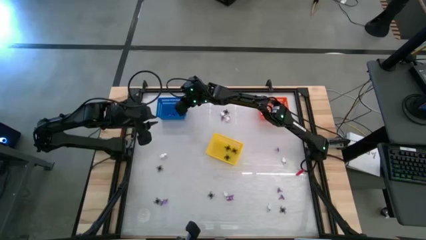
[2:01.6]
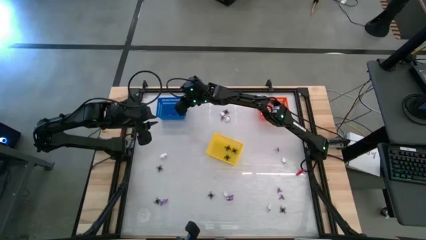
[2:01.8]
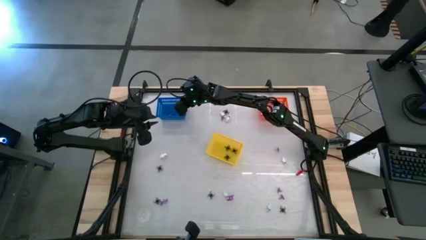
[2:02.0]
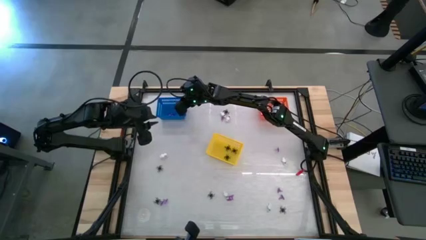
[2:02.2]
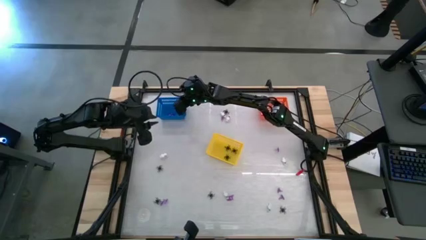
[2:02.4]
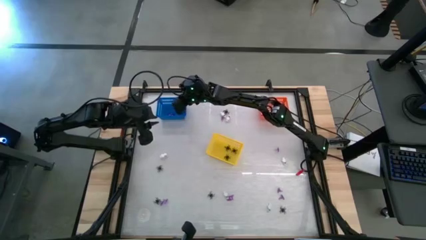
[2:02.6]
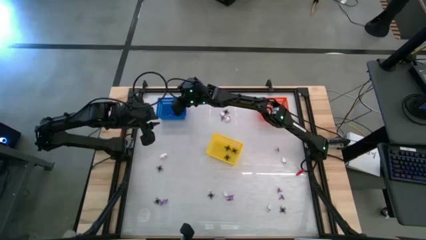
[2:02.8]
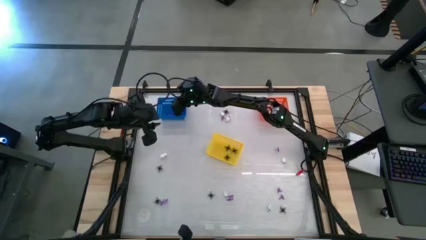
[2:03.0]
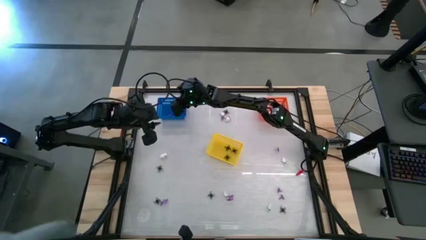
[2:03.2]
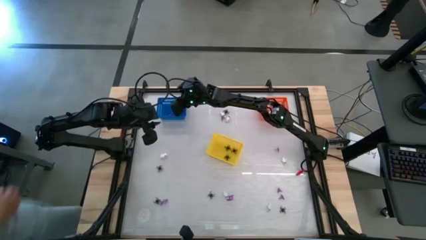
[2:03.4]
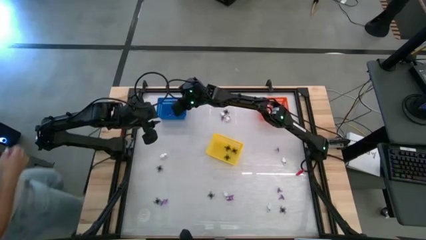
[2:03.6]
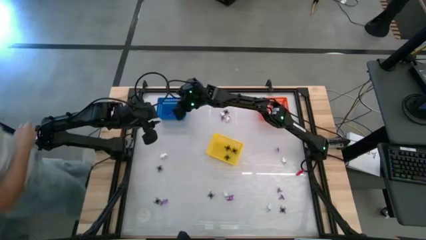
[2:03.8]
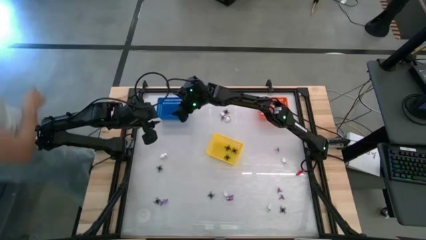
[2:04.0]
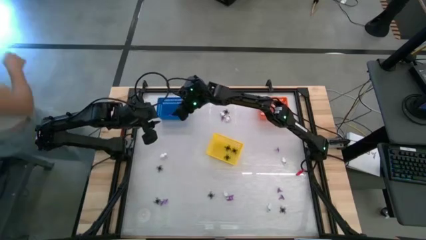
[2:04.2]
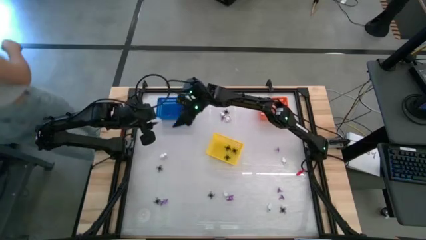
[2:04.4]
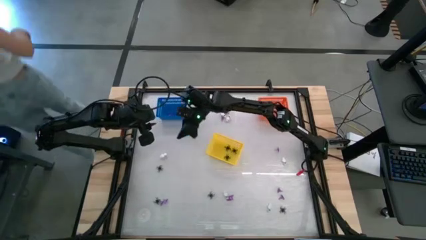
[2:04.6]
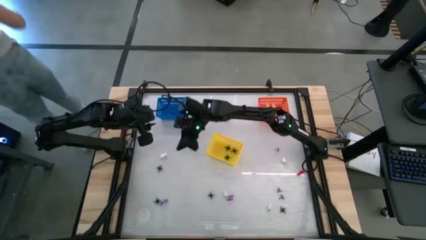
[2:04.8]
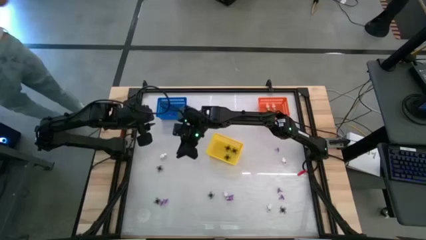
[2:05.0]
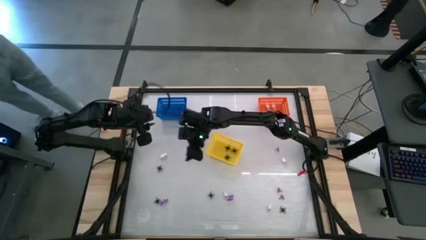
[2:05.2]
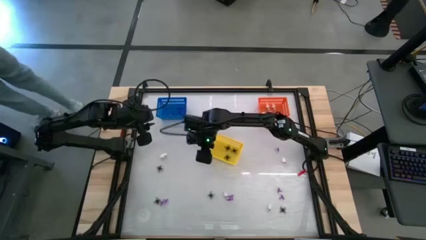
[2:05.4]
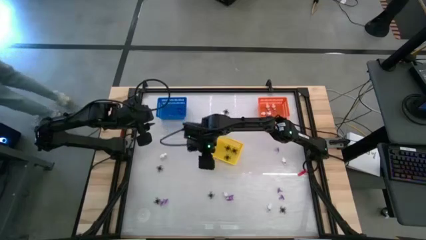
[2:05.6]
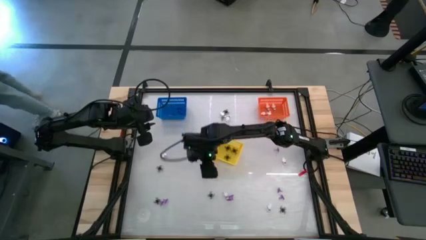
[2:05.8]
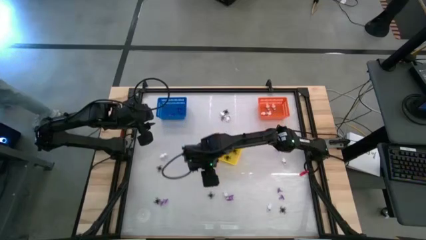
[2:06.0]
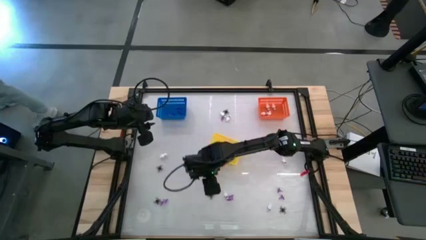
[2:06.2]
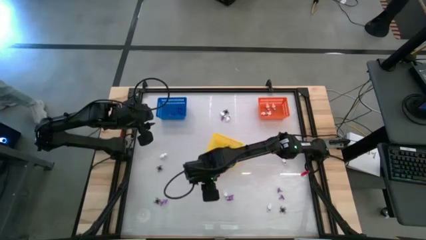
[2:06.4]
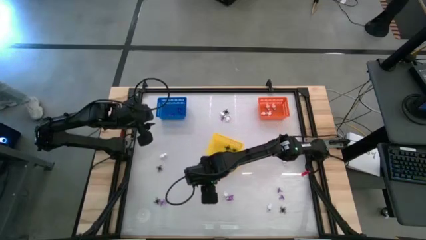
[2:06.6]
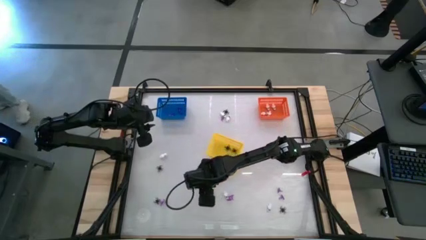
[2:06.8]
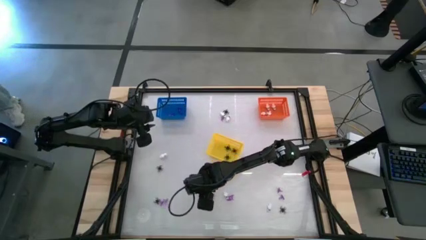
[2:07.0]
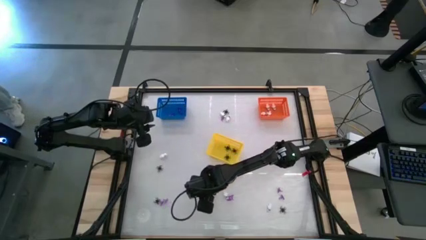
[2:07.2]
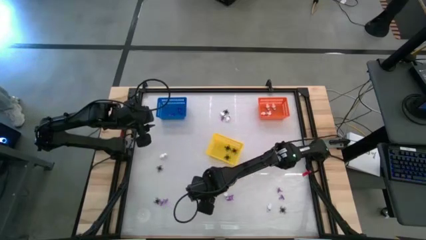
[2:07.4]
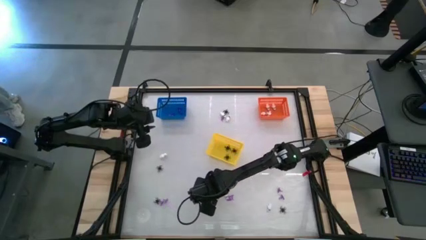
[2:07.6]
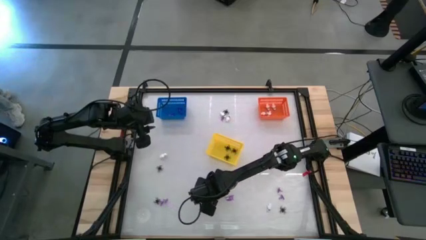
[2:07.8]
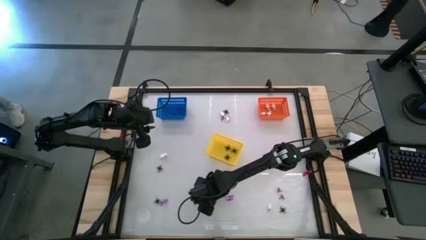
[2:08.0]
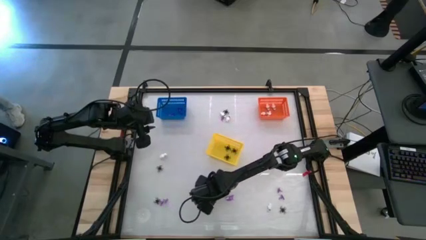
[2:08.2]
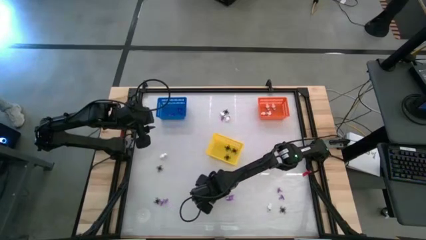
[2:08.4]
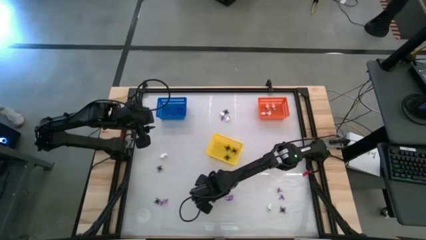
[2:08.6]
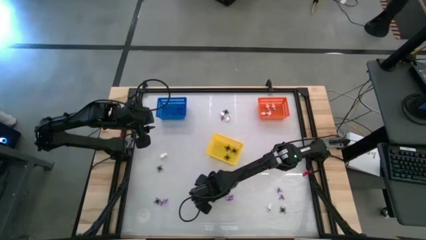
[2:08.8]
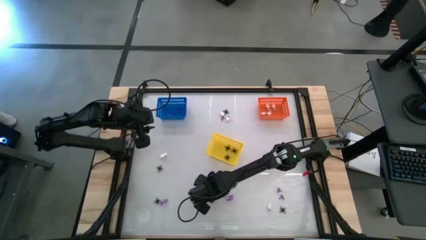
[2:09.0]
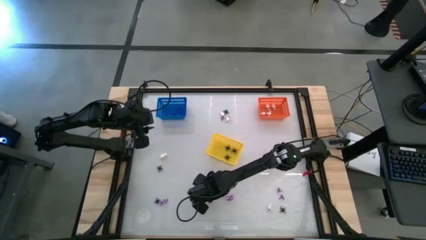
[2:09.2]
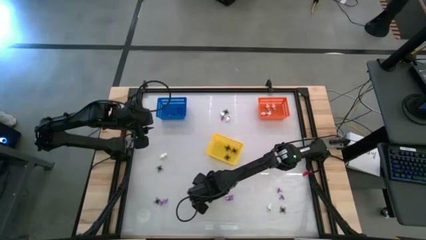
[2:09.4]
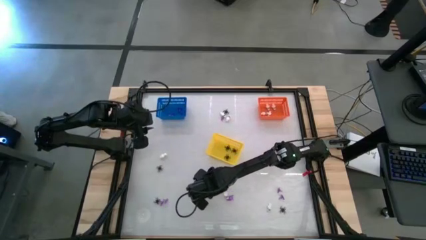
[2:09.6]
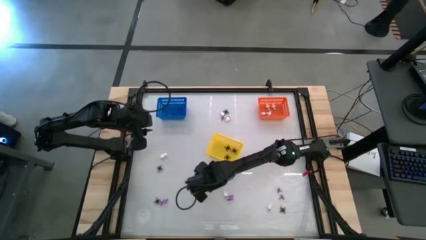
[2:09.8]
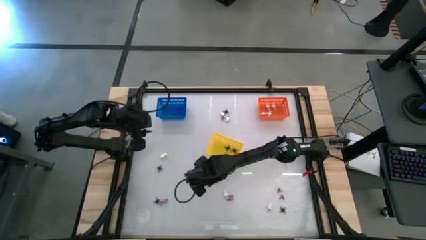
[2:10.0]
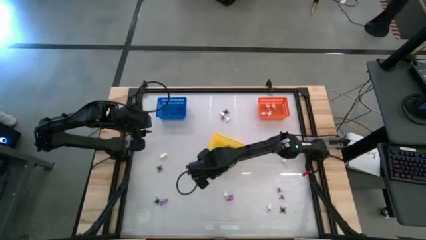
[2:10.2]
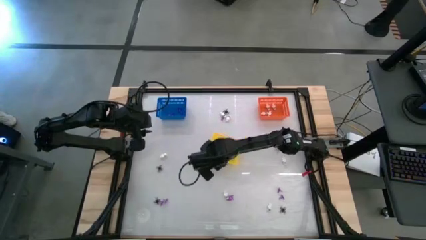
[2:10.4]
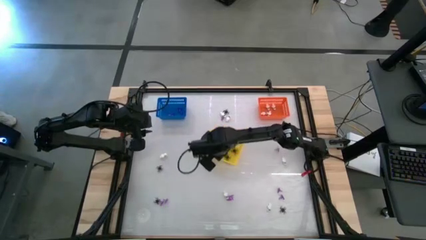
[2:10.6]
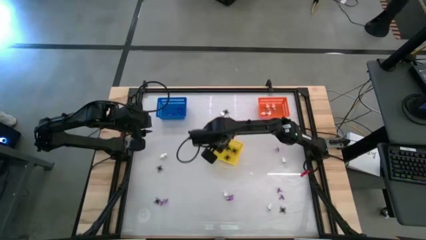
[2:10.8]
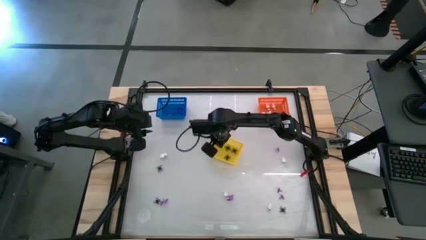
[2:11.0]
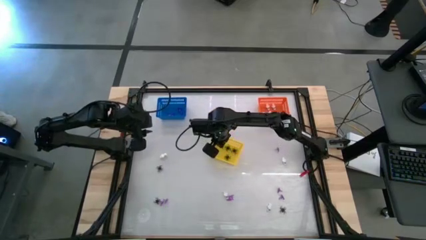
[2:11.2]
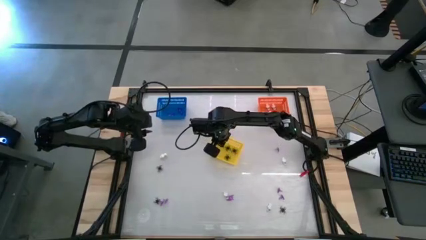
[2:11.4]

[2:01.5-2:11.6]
Task: Sort Halloween decoration
Put the black spider toy into the yellow bin

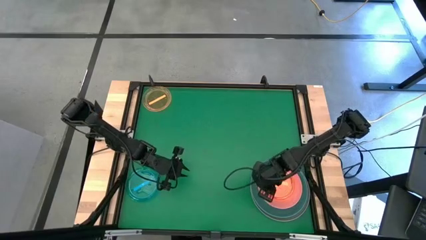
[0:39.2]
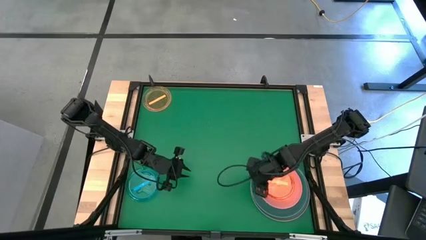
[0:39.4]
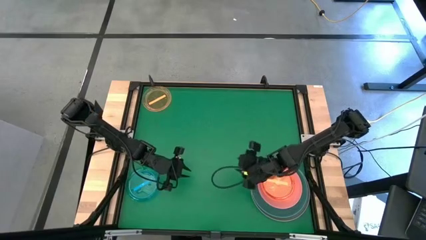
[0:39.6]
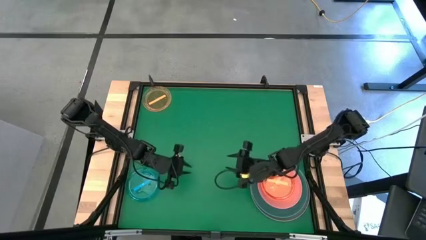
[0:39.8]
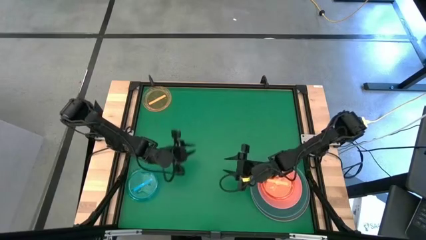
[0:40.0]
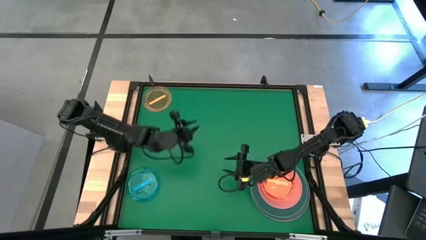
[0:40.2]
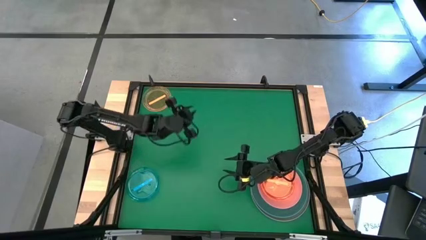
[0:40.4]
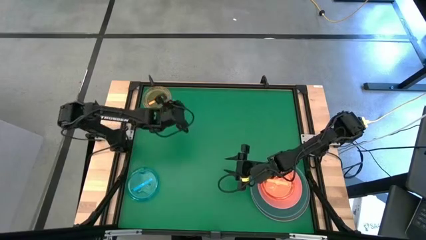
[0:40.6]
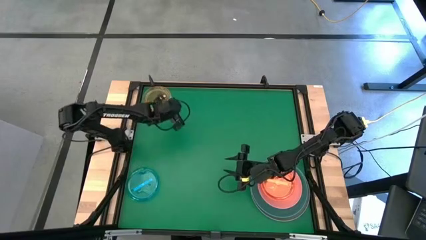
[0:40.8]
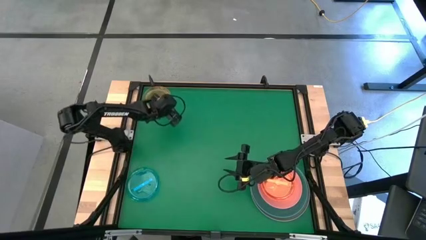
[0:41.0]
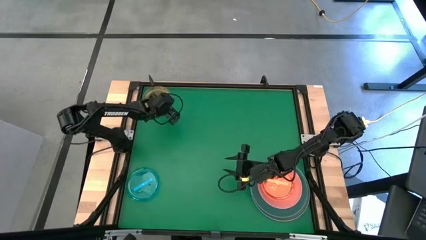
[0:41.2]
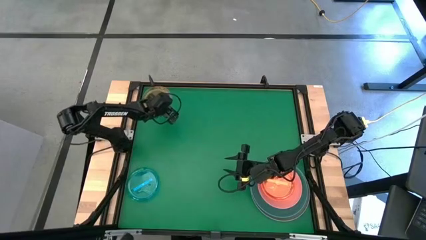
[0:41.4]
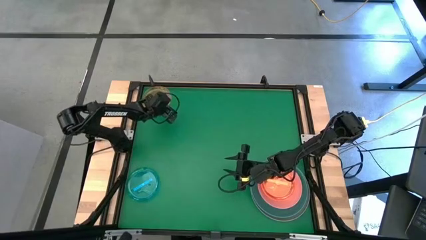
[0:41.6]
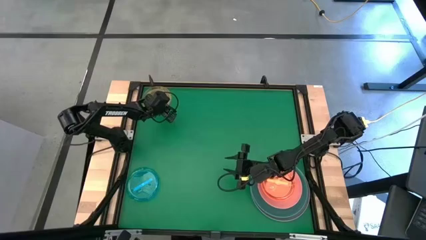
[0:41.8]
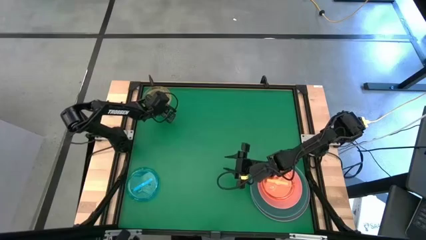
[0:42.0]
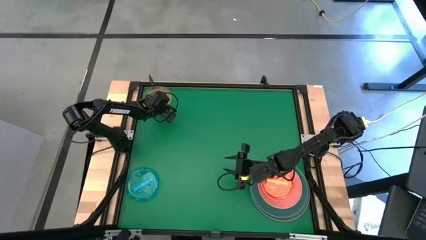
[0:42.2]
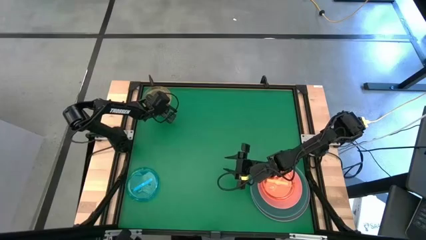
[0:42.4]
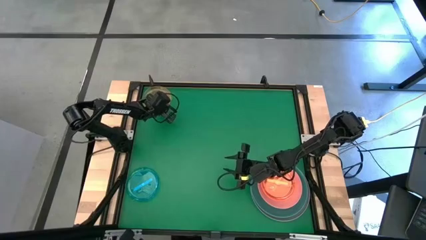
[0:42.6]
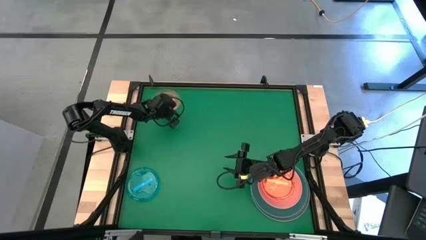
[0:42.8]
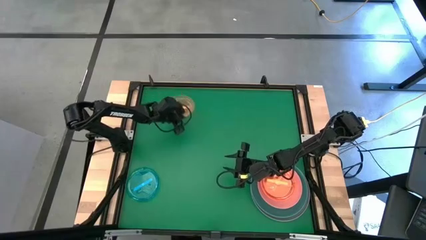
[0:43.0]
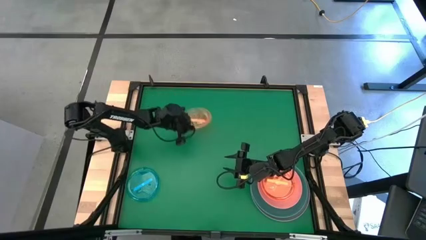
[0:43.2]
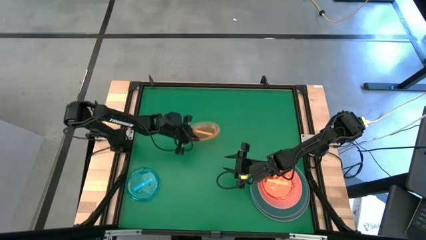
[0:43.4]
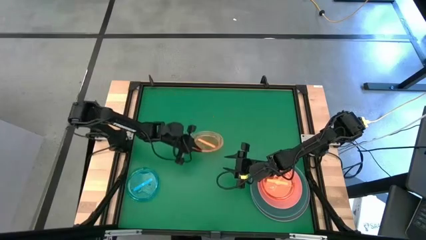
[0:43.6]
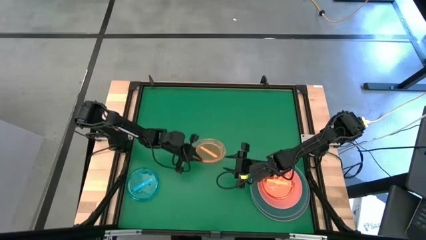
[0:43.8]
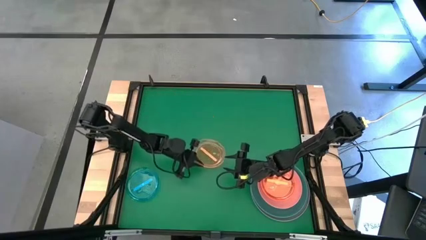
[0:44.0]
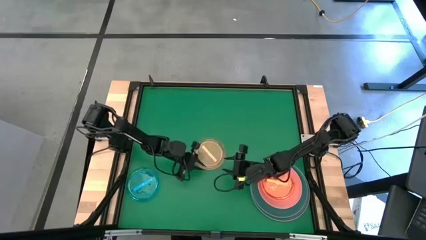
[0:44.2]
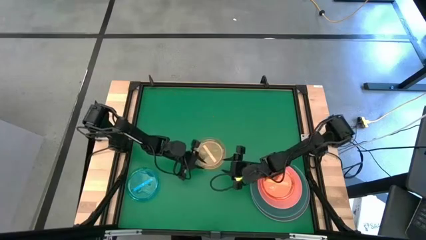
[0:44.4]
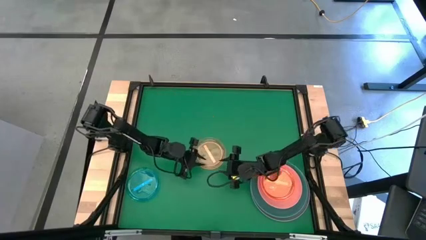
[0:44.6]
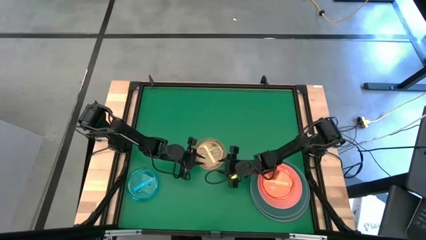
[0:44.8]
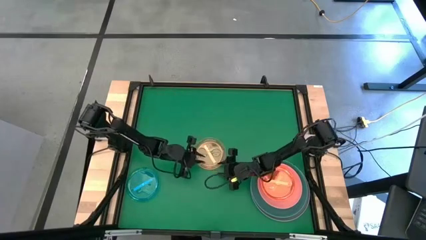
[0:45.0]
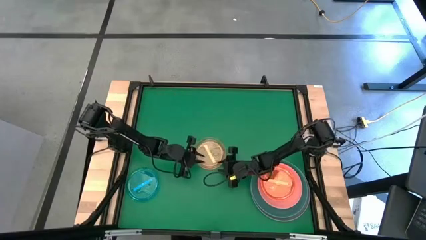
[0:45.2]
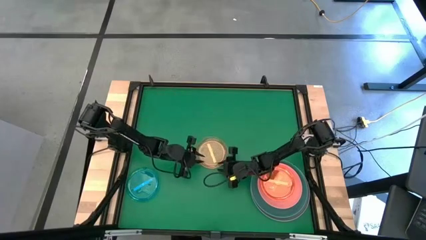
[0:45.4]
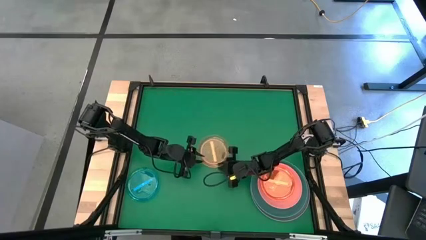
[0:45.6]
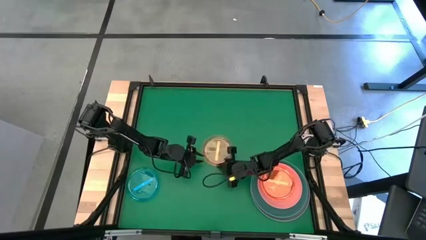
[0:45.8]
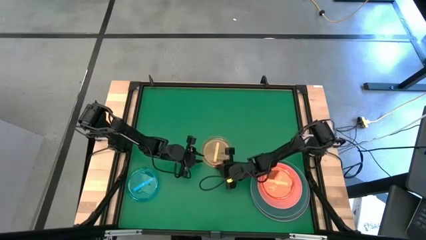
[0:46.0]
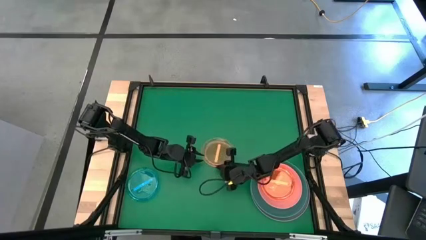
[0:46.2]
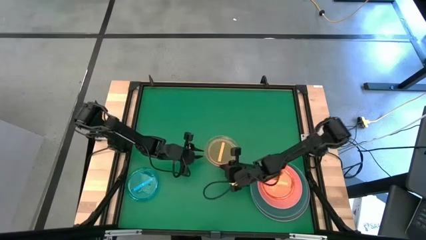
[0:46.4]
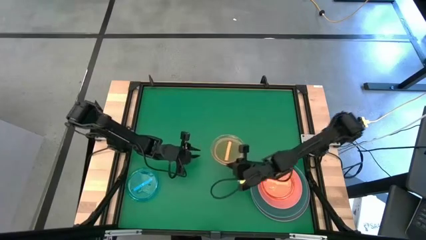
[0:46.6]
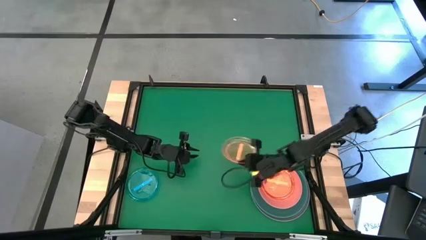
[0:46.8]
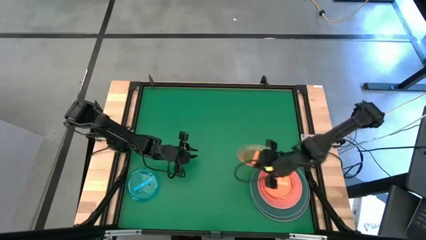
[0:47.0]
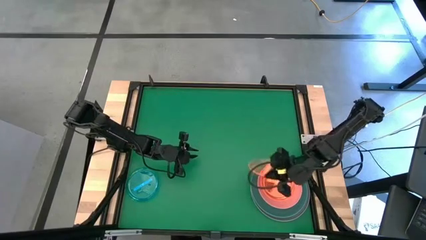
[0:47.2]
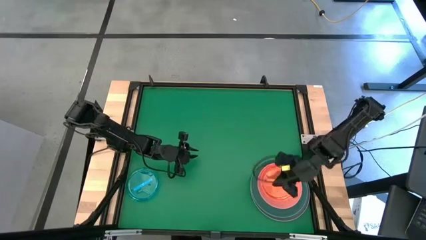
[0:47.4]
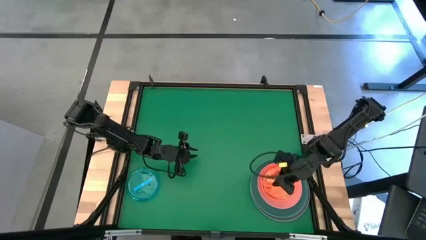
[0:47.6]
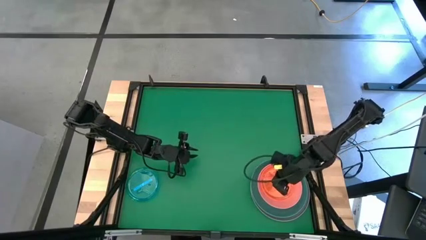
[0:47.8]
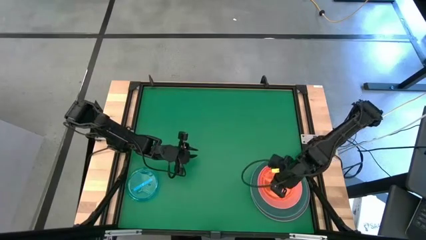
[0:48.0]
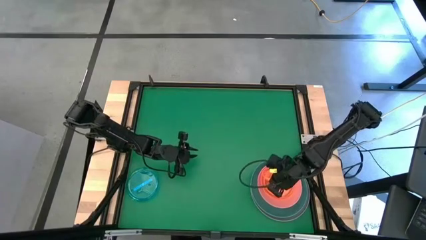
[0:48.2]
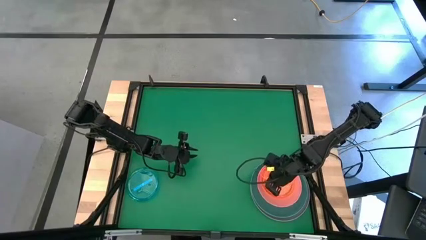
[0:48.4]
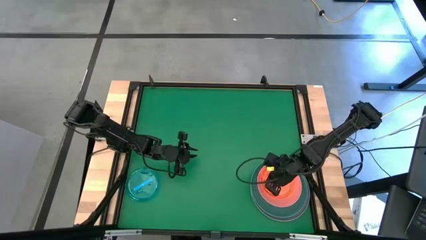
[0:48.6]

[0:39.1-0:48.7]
Task: Stack plastic plates
Stack the light orange plate on top of the light orange plate
